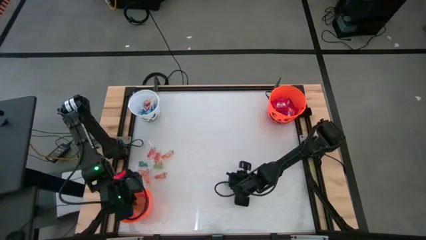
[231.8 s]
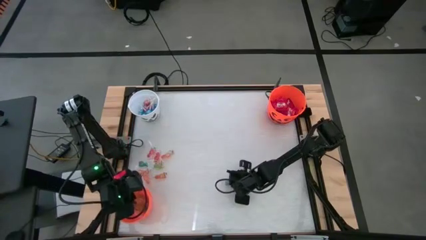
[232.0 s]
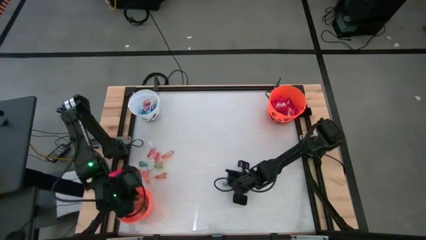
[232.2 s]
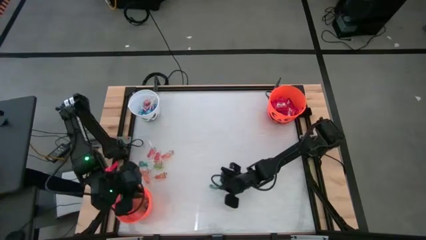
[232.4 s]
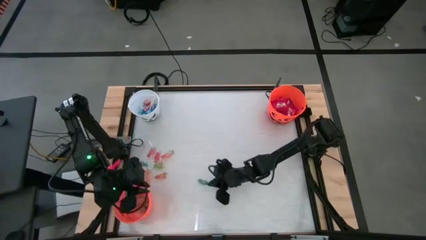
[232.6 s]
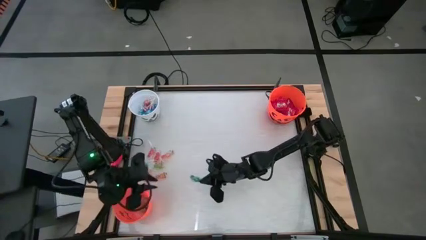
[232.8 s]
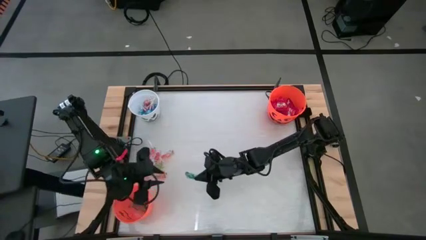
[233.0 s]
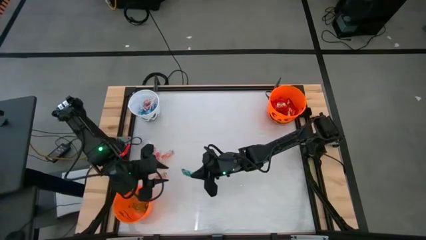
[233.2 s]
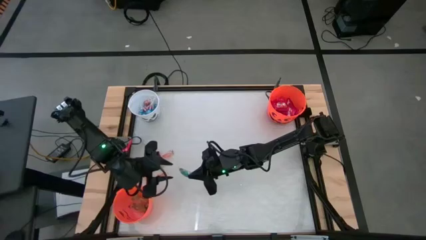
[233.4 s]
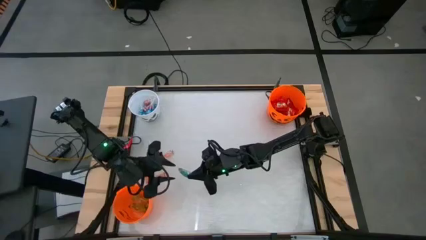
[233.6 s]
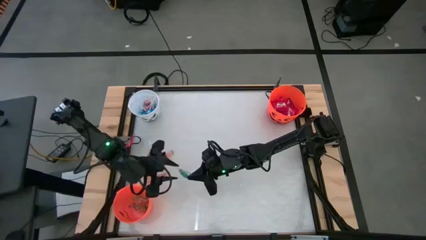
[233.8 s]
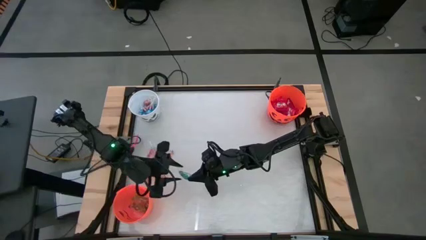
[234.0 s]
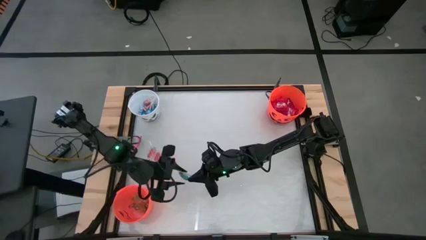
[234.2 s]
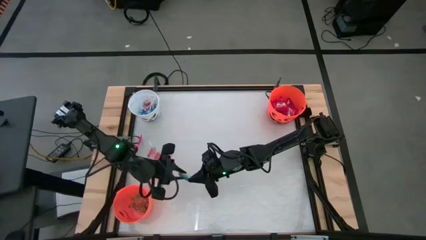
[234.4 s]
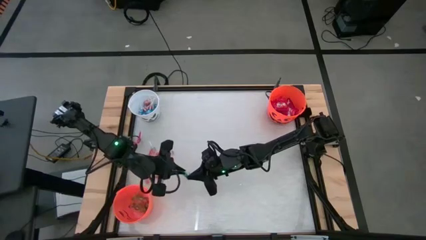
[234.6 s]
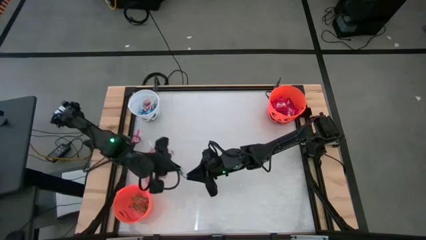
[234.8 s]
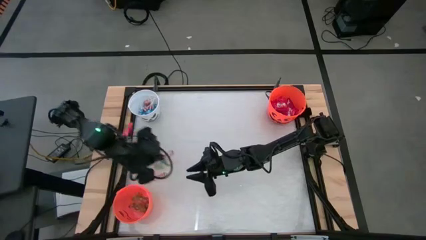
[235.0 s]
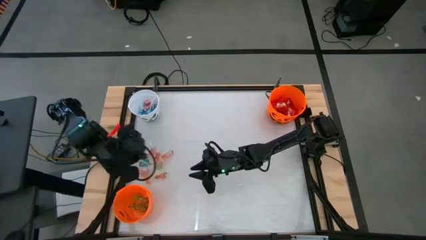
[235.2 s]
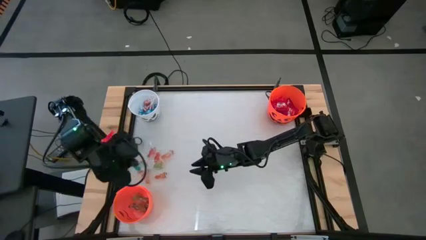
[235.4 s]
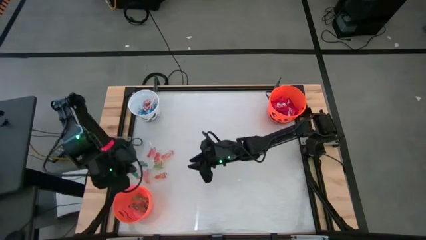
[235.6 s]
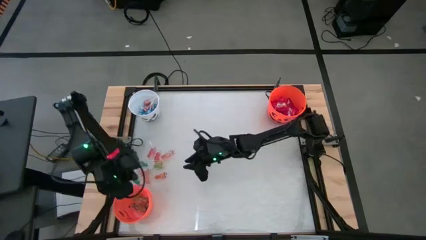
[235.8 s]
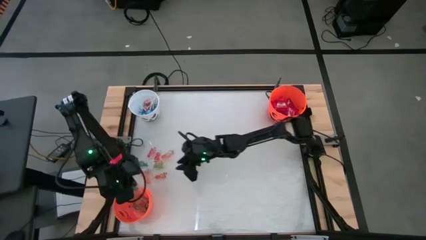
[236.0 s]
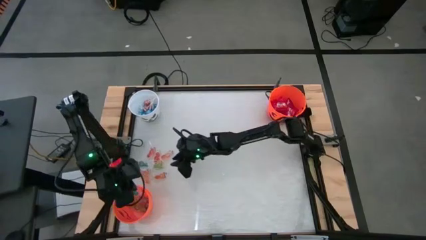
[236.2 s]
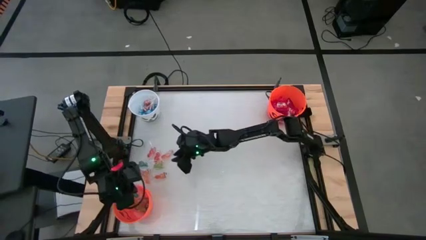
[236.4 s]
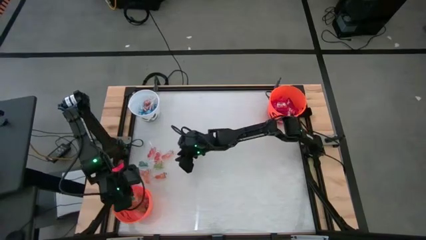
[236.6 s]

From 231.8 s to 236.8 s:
Task: Sort candy by brand, put in halloween buckets
Put the blue gummy into the bottom orange bucket

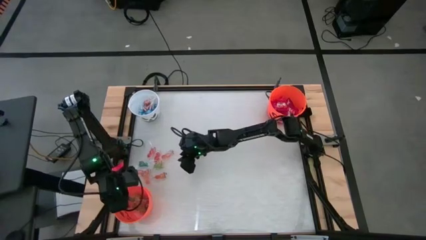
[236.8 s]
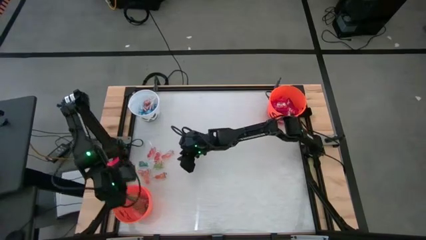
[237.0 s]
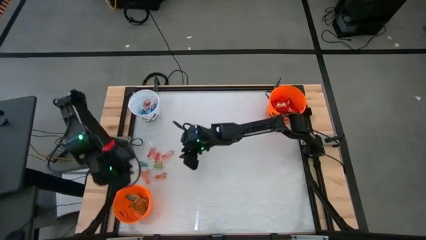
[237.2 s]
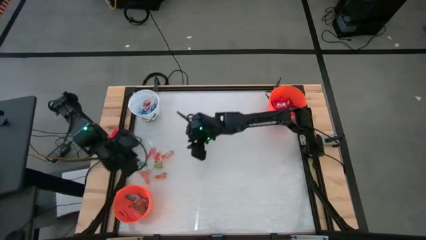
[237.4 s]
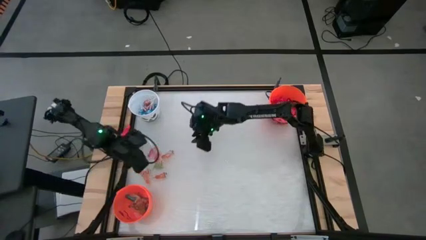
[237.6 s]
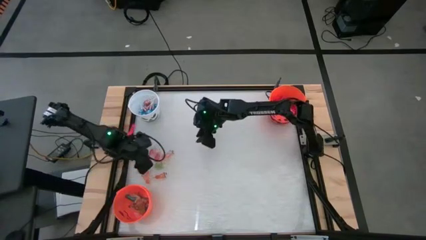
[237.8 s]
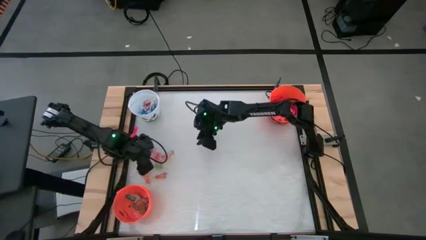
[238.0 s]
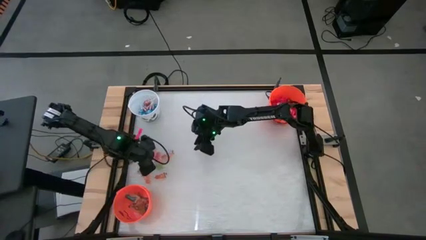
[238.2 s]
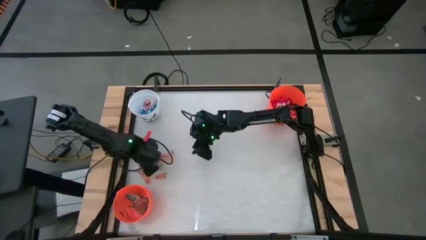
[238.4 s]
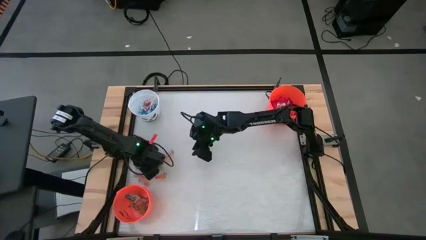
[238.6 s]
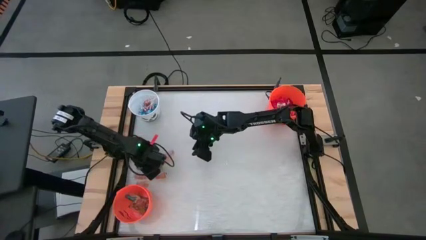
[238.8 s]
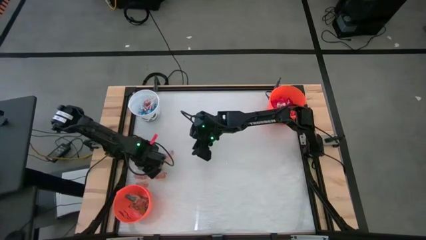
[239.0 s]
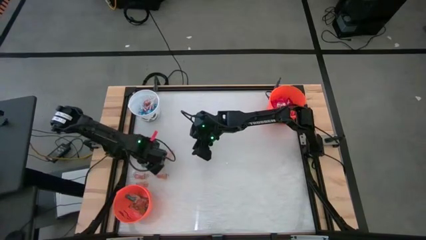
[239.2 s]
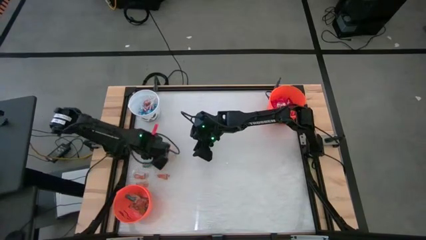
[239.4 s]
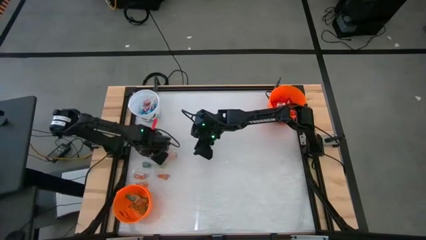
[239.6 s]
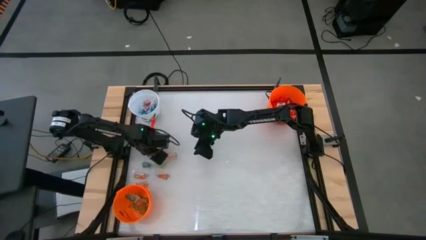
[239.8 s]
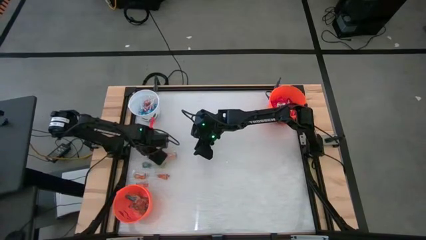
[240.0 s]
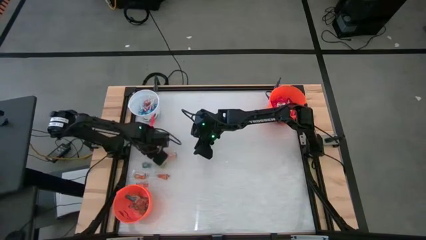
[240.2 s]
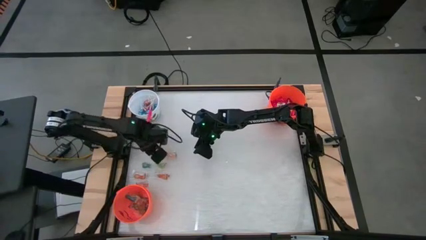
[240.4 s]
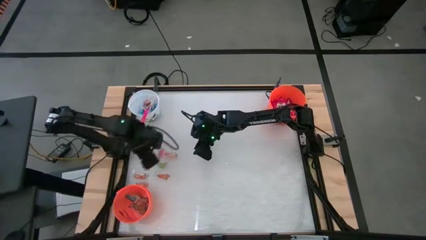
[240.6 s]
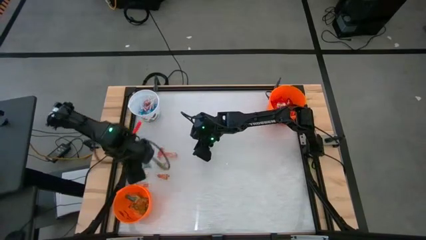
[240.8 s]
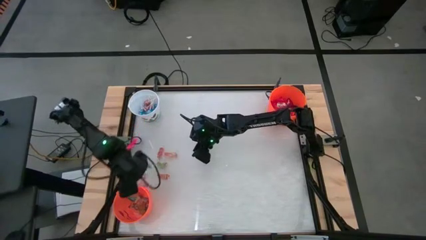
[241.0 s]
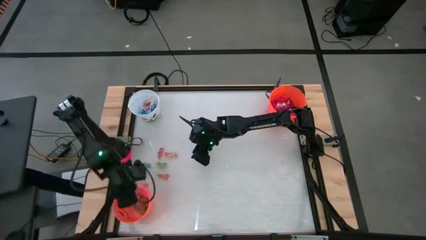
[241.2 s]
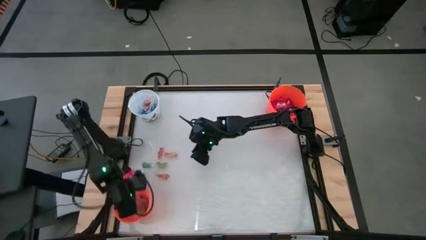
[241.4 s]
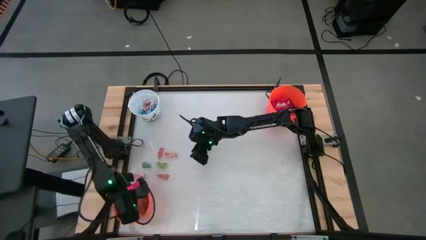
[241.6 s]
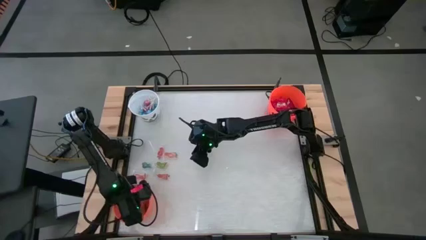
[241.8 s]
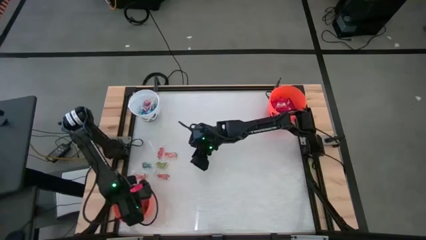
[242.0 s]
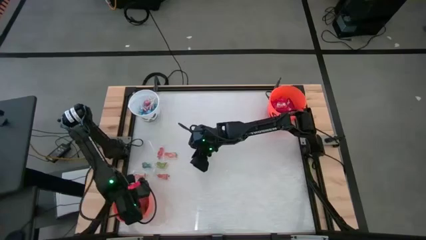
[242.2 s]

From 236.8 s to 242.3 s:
Put the orange gummy into the bottom orange bucket

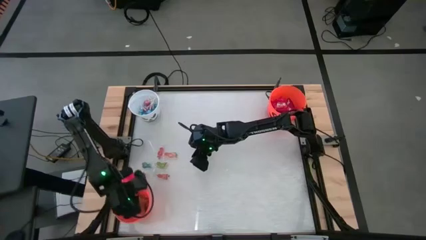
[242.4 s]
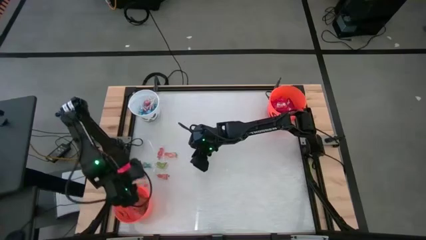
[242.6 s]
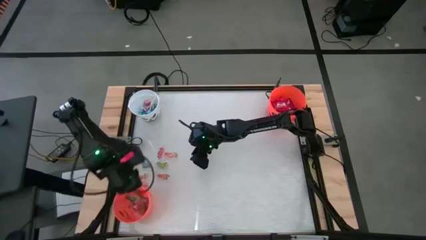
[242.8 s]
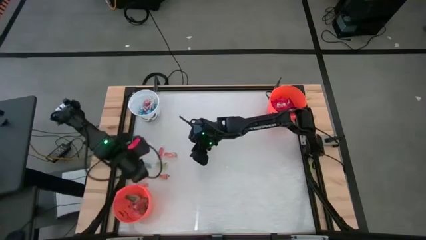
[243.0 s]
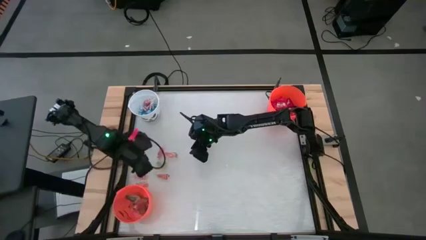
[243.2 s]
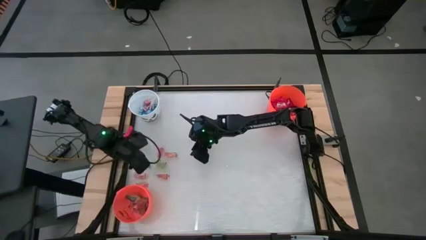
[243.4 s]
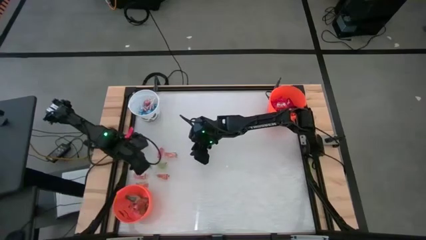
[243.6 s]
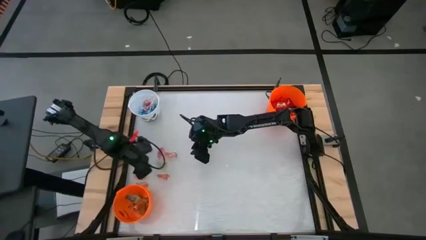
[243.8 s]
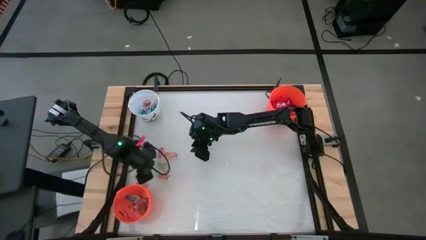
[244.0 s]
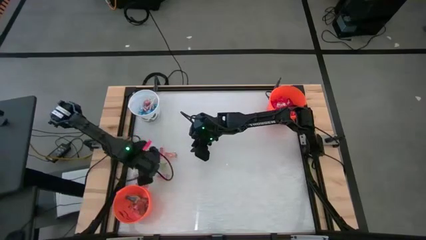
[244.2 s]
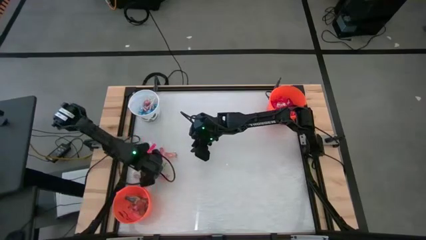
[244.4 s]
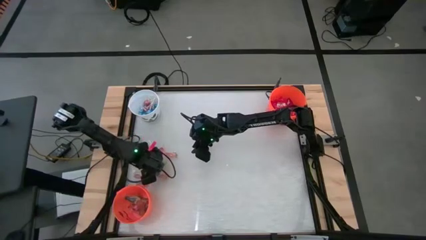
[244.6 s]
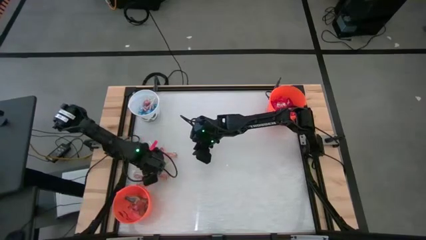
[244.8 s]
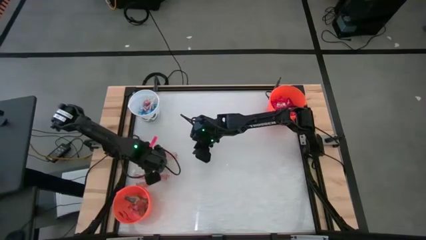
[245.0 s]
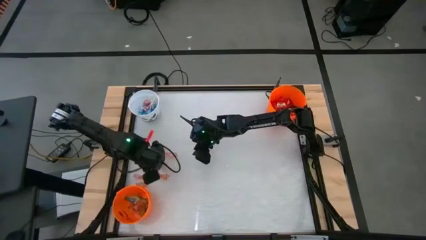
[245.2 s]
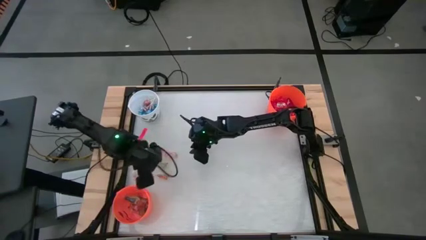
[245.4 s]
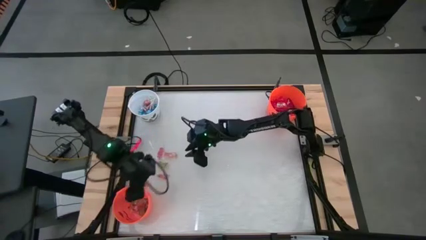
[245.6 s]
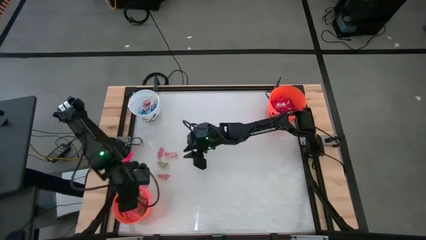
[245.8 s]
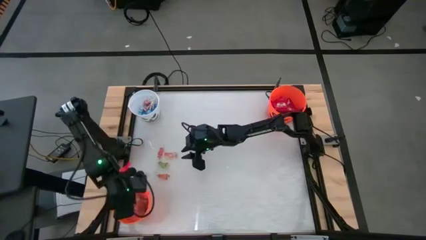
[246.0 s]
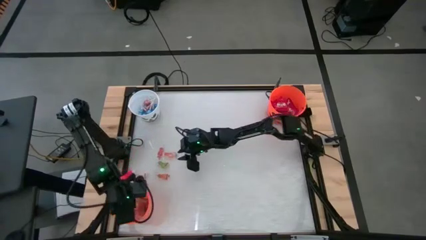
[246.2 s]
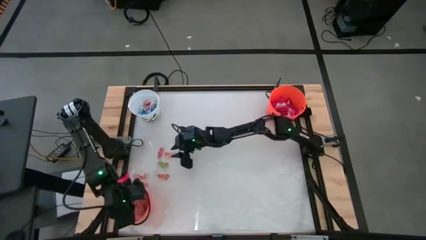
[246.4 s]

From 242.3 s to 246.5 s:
Put the blue gummy into the bottom orange bucket

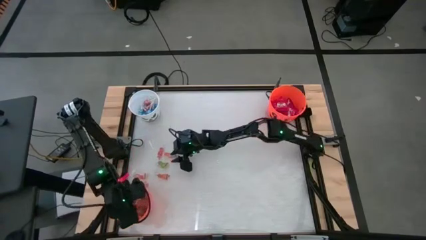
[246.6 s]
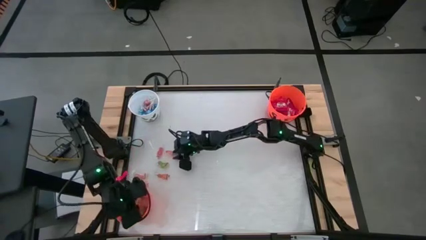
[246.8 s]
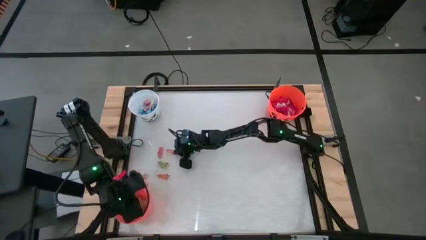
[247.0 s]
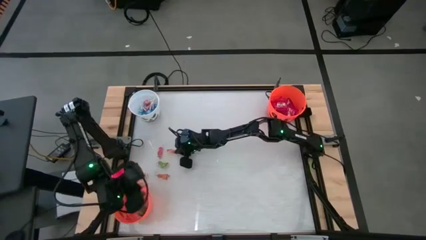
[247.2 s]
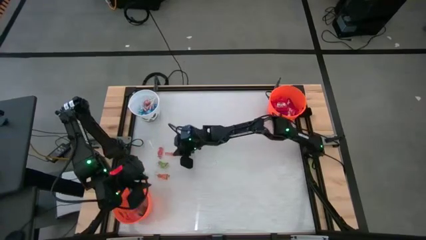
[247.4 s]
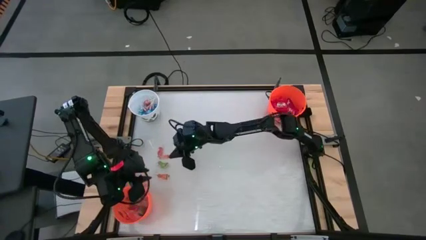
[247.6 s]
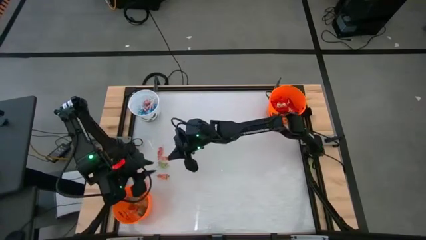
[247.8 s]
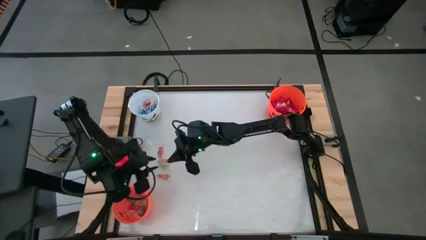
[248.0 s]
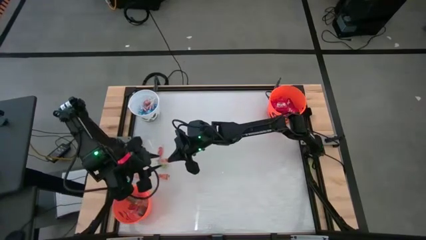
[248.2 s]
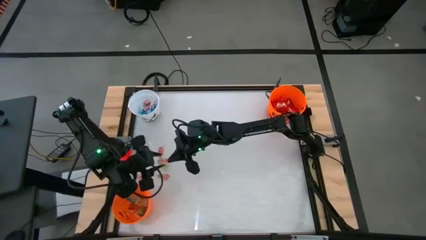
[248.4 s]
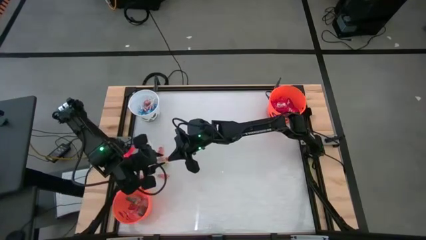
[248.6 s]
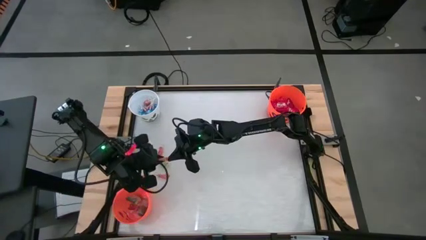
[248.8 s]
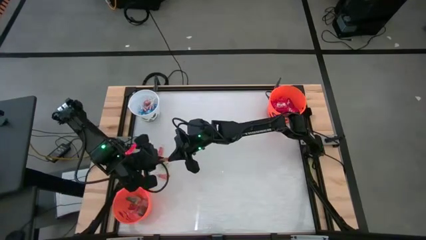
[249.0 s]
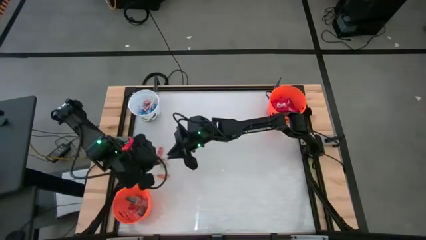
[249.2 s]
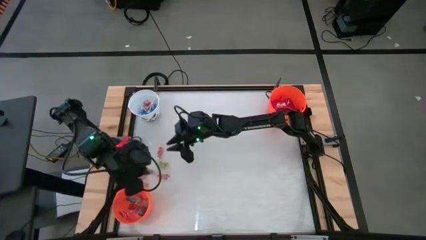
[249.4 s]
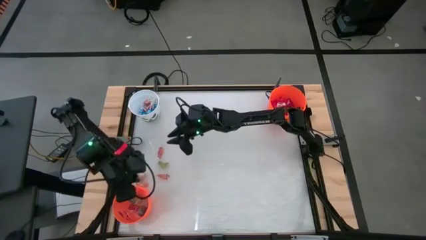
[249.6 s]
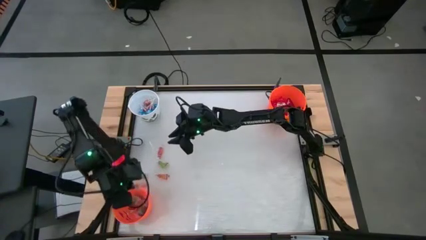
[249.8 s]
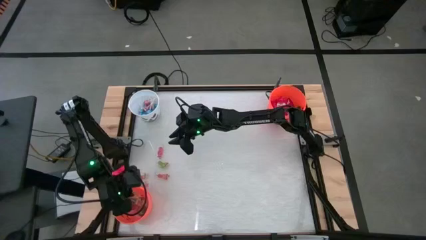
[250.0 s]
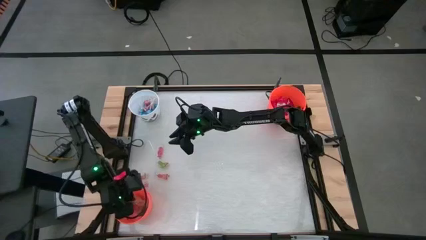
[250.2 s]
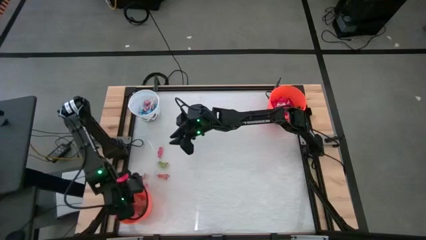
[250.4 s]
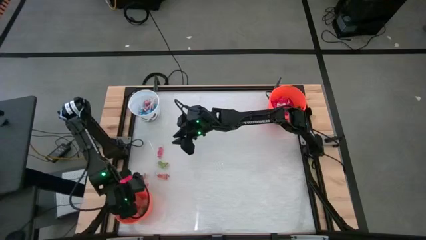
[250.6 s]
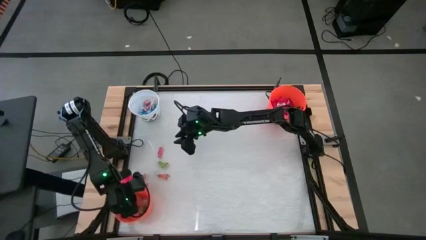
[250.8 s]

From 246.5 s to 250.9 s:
Put the orange gummy into the bottom orange bucket
